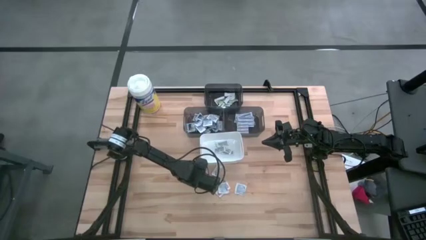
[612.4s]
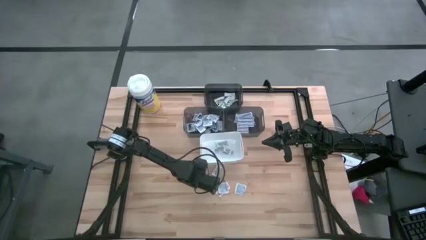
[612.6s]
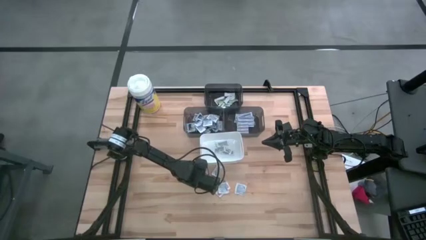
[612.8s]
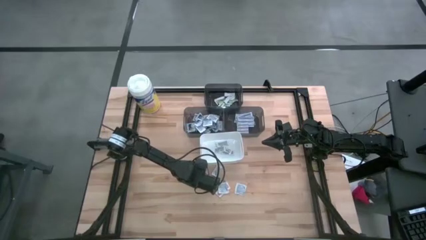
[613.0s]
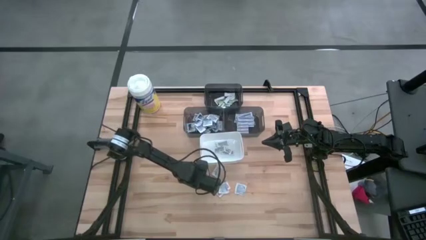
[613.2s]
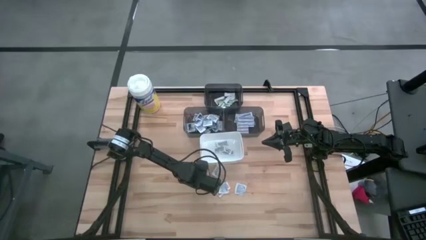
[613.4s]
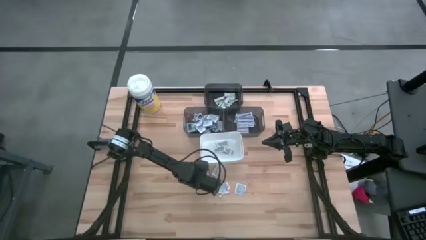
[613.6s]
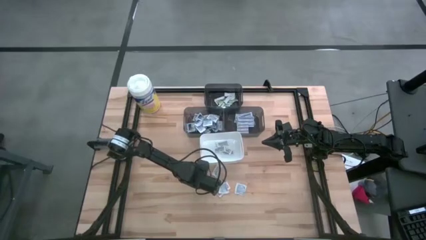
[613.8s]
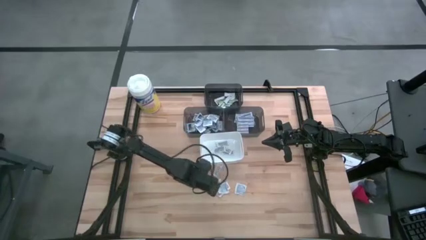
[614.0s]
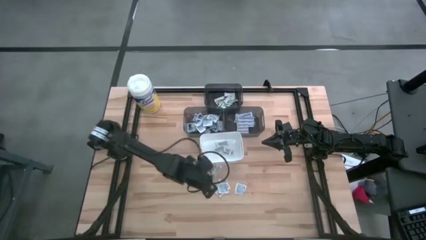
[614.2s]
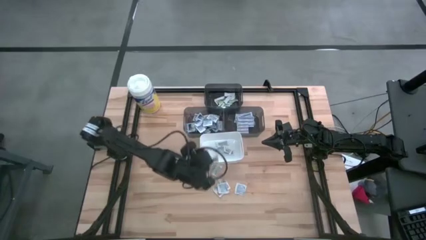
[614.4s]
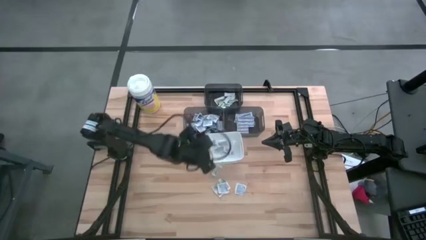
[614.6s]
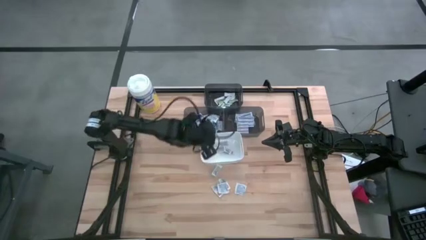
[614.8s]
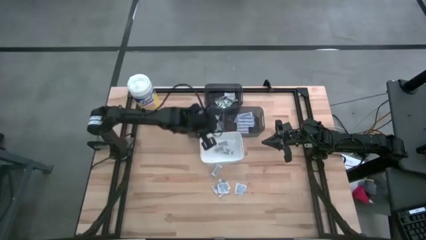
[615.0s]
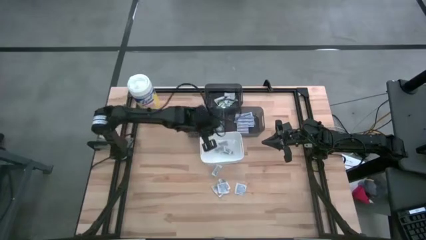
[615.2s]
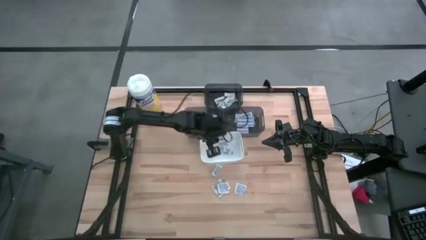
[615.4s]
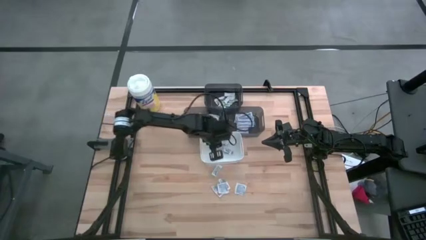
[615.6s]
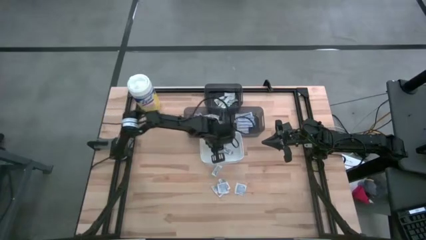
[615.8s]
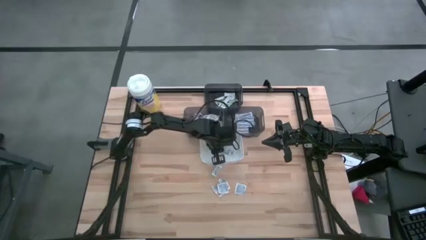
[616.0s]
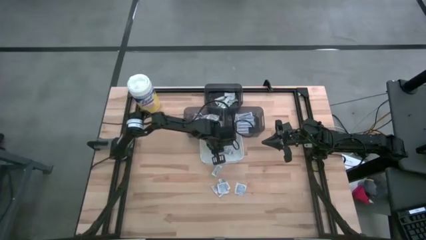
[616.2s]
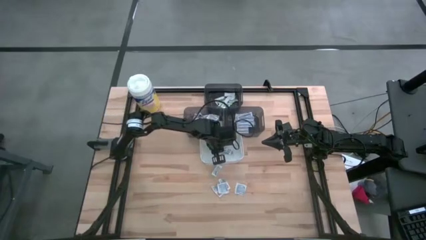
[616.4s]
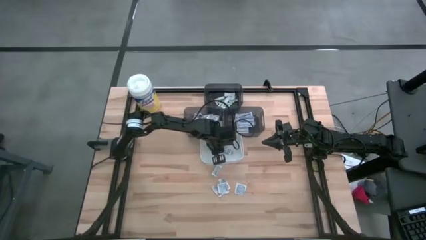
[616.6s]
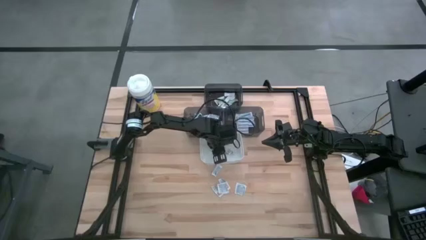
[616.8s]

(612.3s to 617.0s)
Task: Pick & Place First Aid Supplies
Put the ointment pack into the white bin

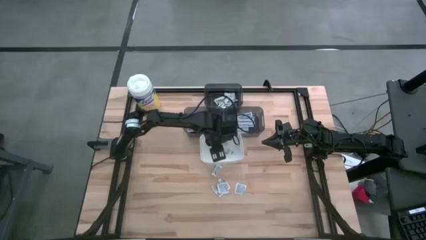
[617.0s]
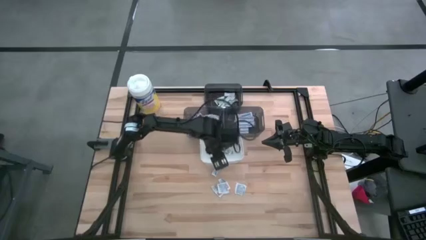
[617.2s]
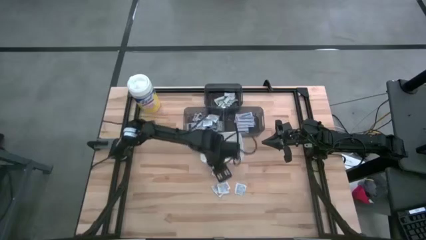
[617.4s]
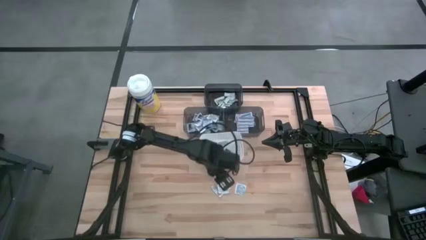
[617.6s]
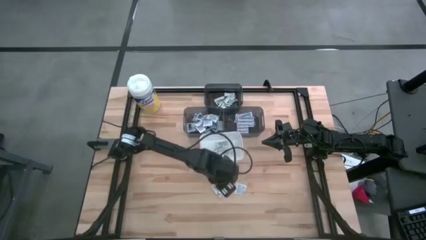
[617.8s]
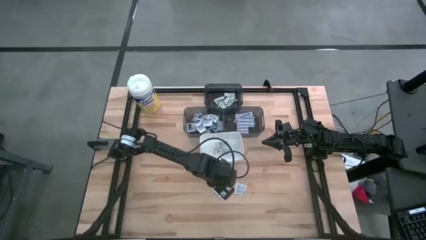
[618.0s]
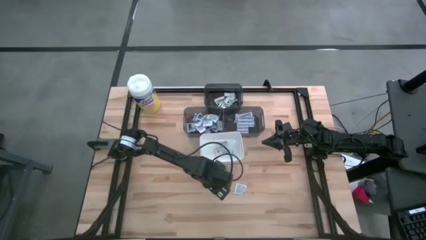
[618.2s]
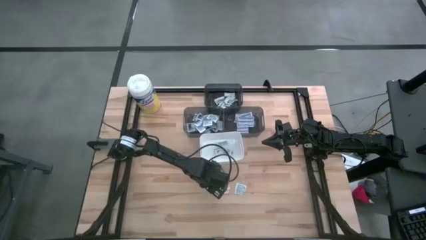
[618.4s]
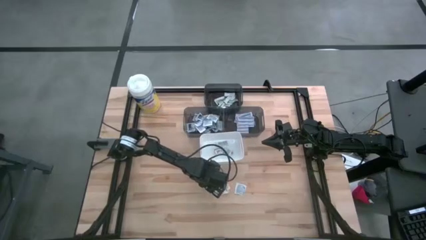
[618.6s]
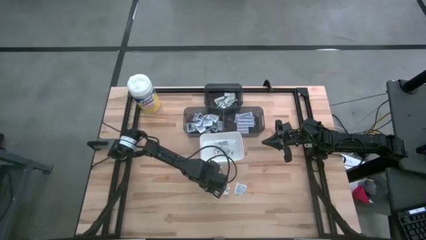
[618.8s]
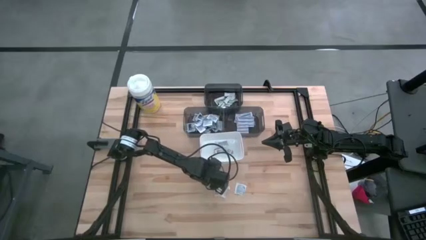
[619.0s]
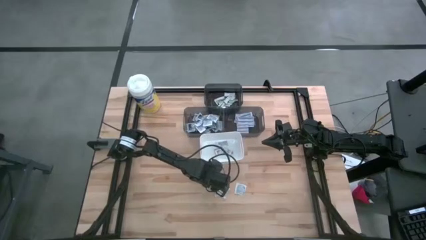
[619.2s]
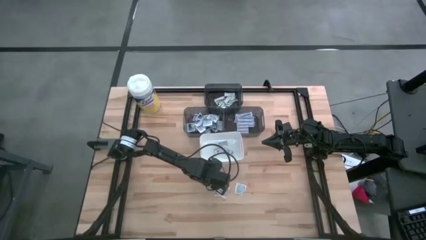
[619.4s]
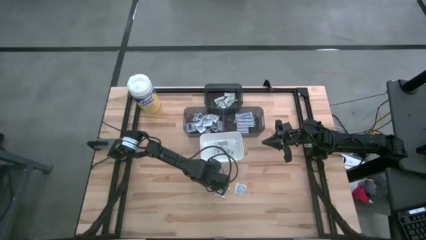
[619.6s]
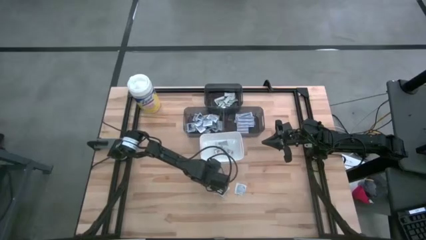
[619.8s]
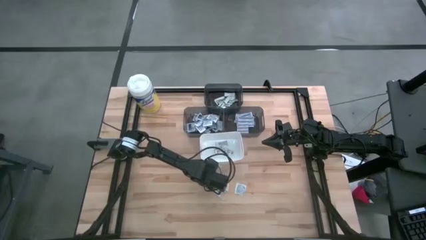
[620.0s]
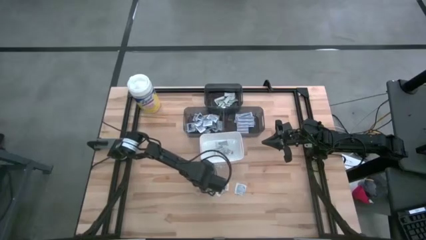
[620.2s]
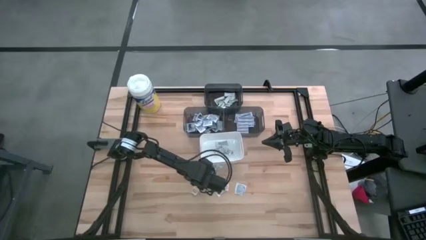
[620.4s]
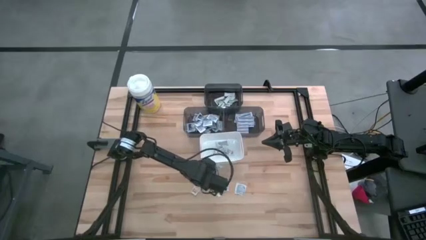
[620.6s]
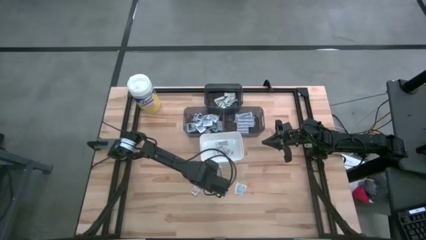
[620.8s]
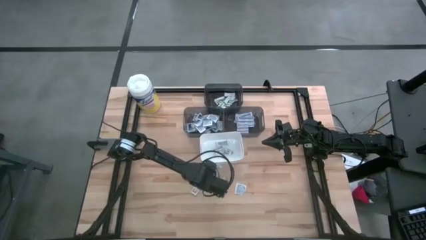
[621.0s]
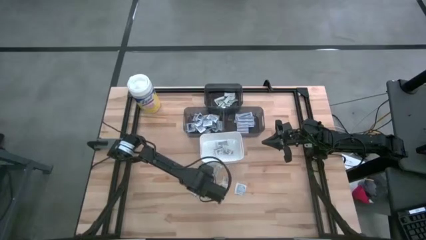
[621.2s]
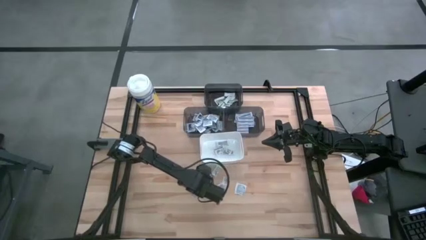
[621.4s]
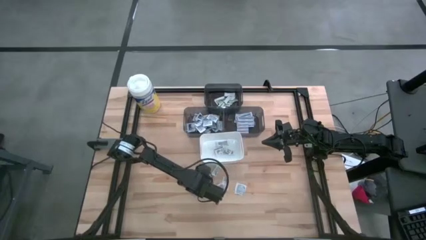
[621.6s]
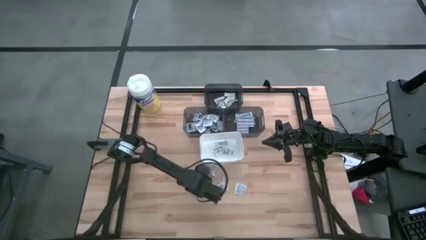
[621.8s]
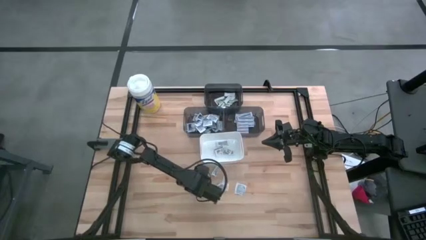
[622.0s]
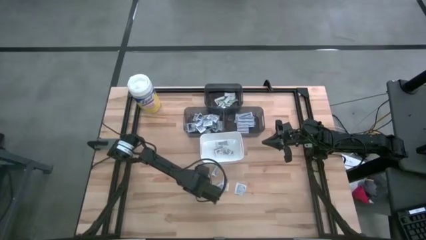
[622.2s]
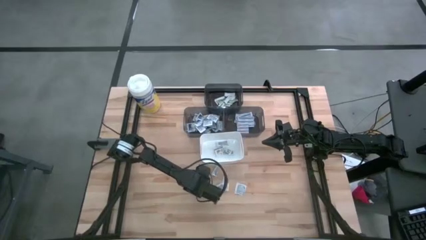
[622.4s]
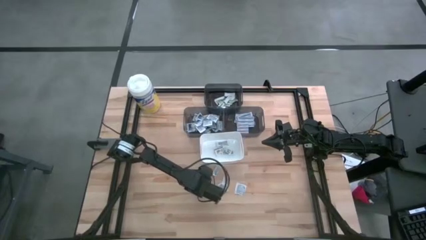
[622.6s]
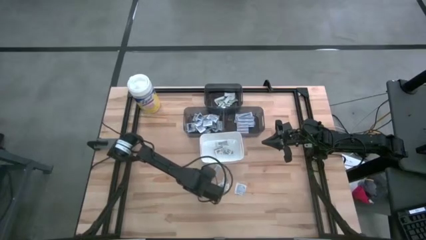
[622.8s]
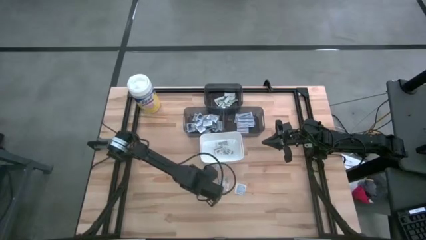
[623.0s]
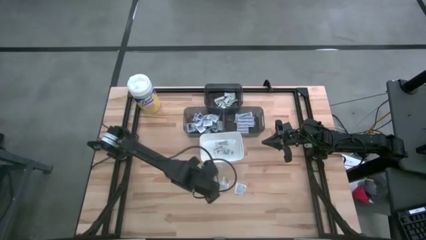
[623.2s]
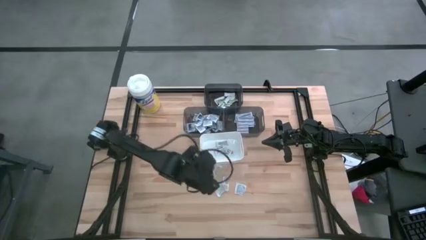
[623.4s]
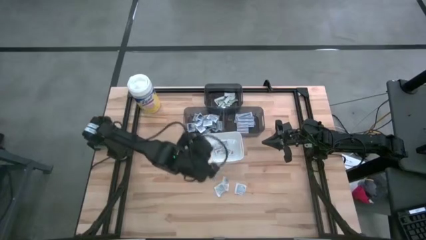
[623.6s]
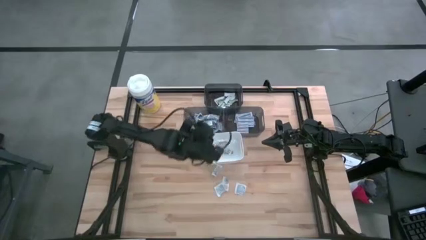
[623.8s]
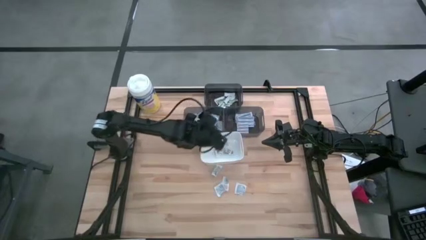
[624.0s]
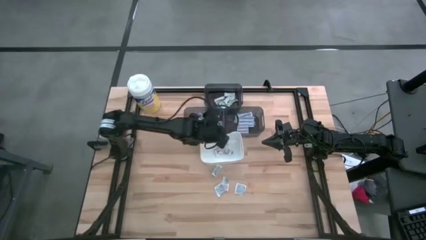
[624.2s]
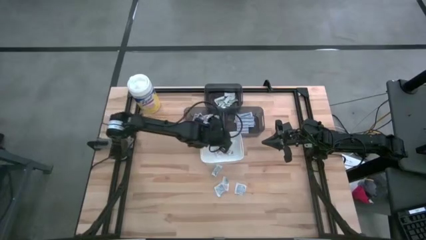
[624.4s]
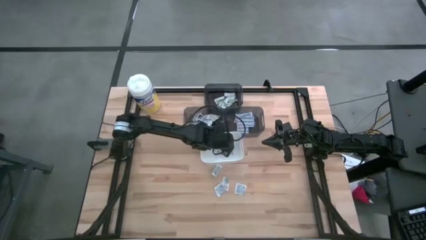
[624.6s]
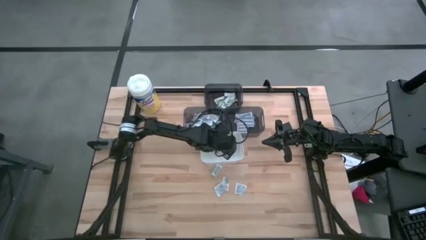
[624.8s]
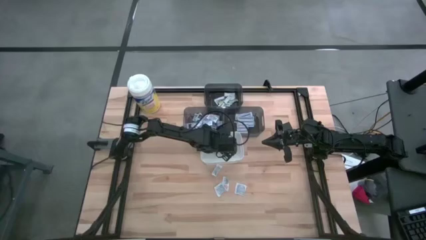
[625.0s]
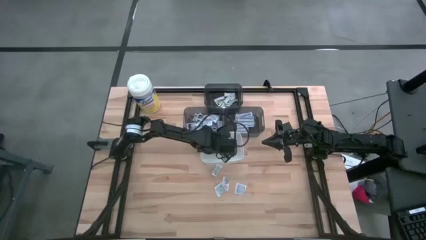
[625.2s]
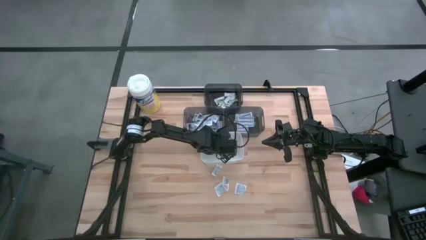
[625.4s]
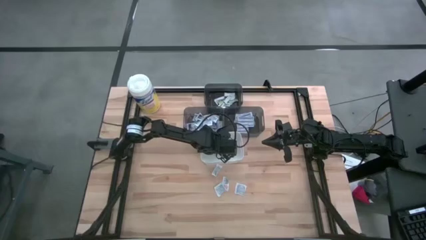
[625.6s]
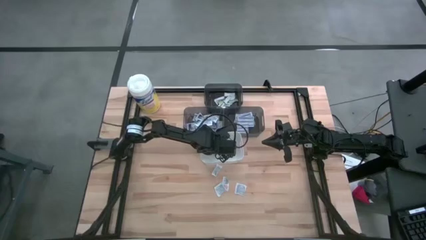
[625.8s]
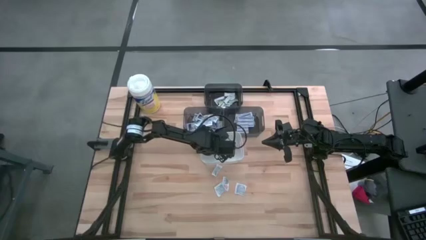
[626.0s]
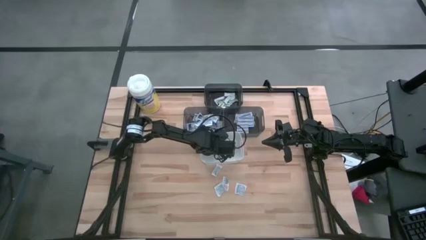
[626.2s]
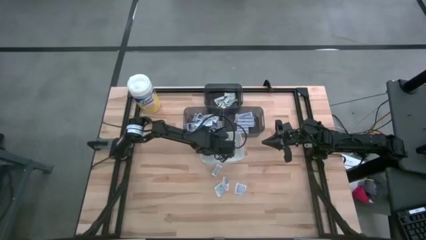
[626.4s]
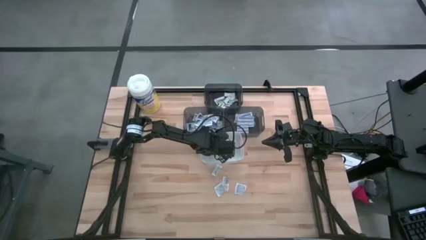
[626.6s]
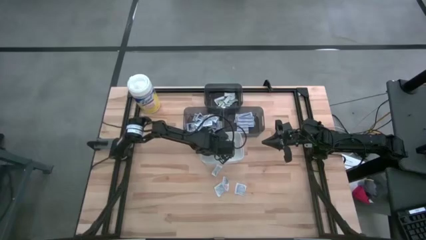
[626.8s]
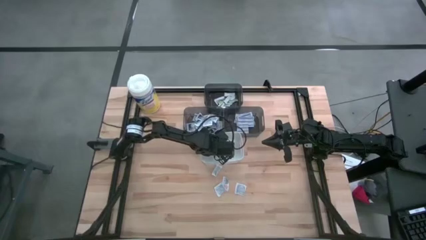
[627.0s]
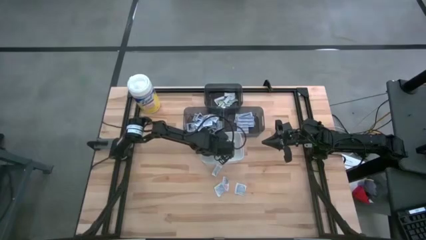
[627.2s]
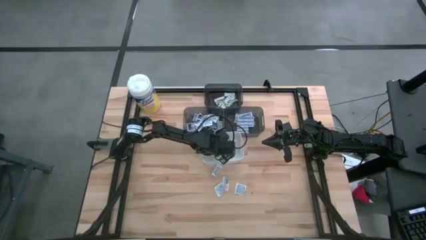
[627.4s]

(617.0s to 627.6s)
Put the ointment pack into the white bin

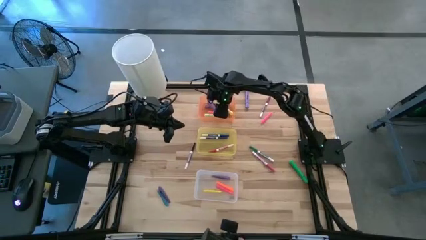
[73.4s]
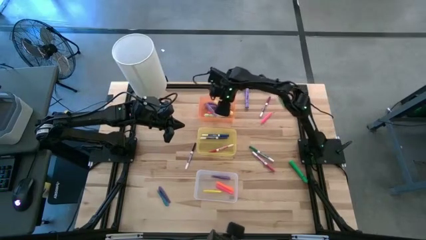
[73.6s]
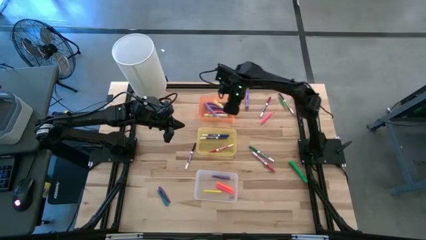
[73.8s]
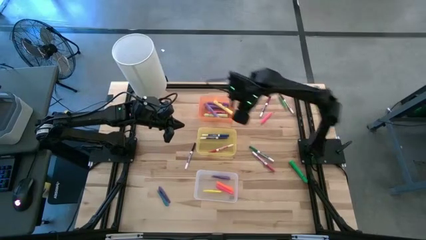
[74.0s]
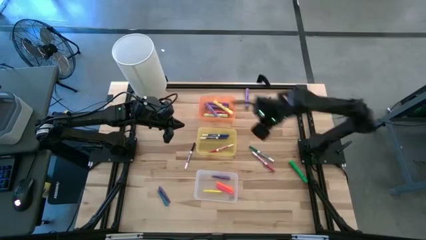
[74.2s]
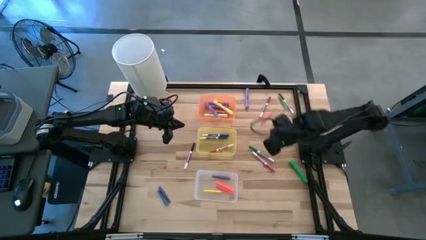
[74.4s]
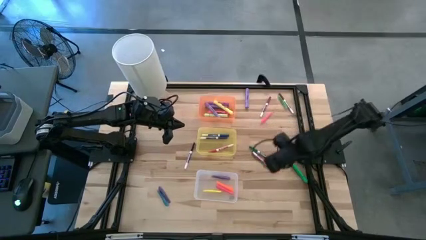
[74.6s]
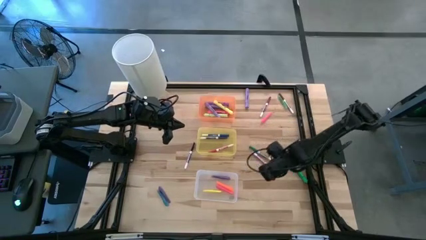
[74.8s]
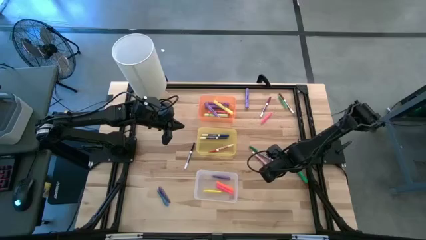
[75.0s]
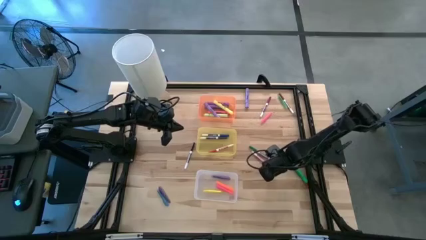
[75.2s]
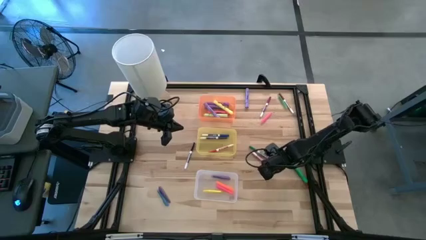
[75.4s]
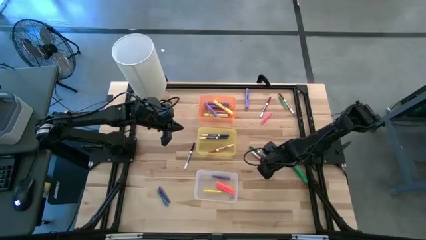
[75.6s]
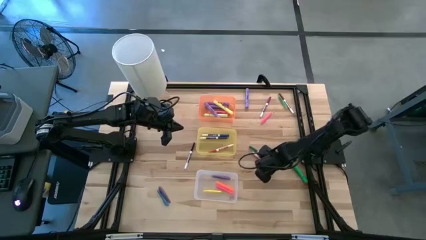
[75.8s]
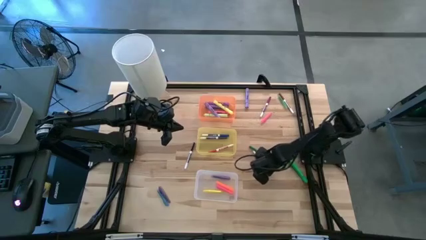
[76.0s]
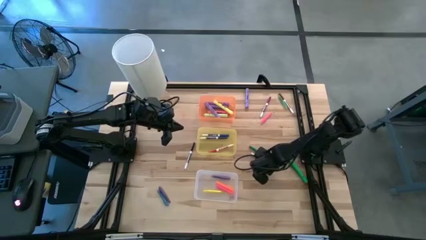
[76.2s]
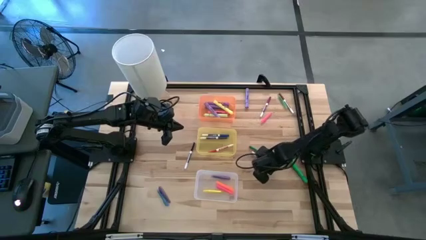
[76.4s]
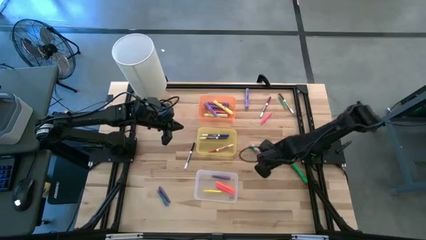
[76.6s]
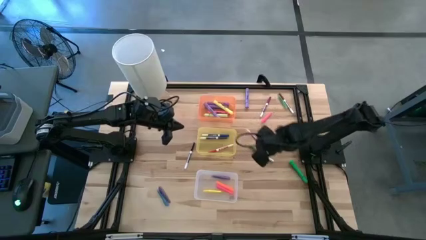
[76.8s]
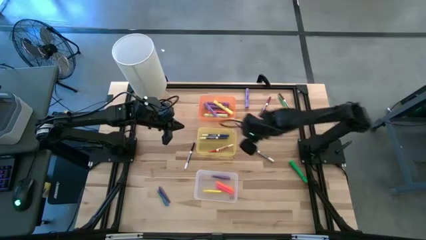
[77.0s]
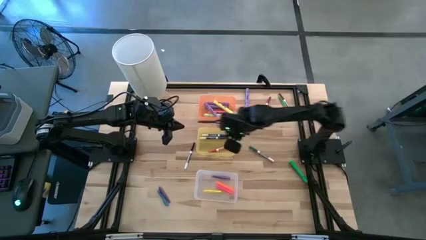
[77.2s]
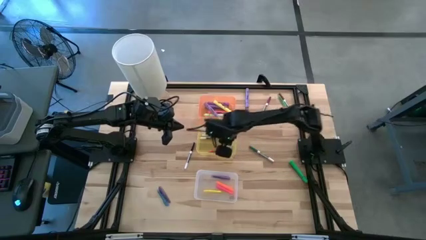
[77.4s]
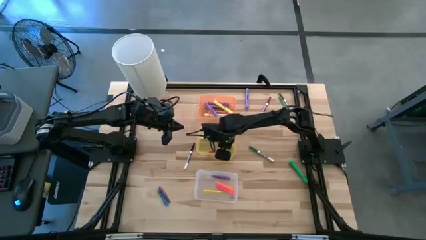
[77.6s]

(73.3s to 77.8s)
Task: Pick & Place Markers
Put the pink marker pen into the yellow bin
